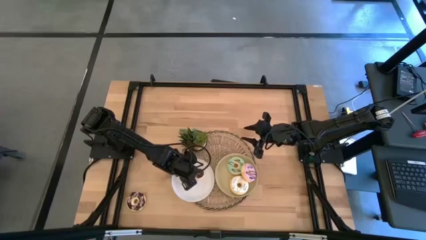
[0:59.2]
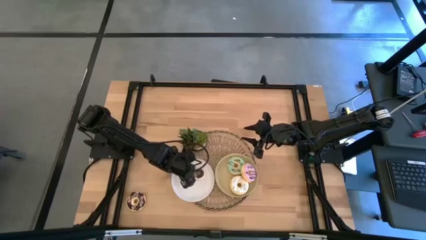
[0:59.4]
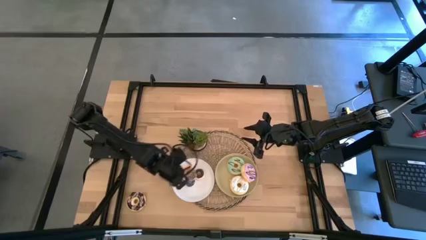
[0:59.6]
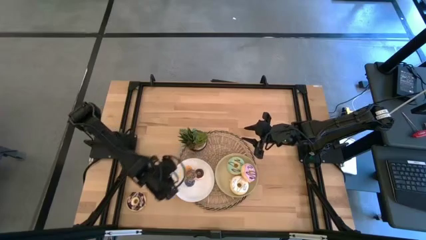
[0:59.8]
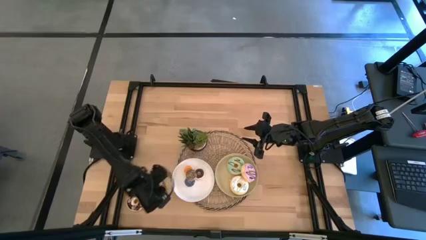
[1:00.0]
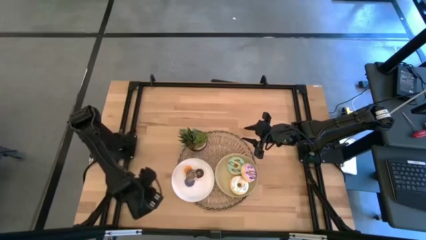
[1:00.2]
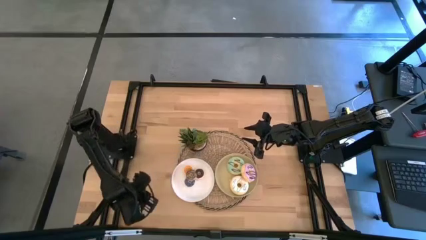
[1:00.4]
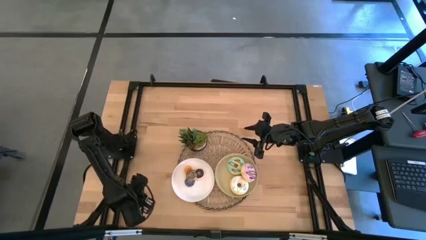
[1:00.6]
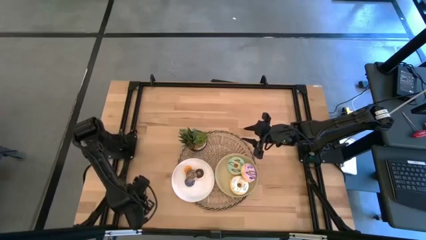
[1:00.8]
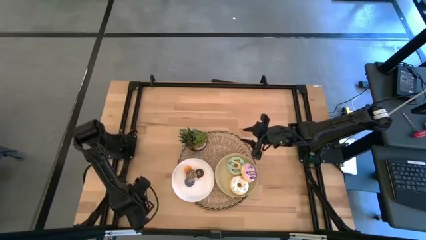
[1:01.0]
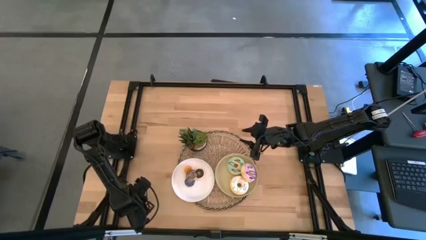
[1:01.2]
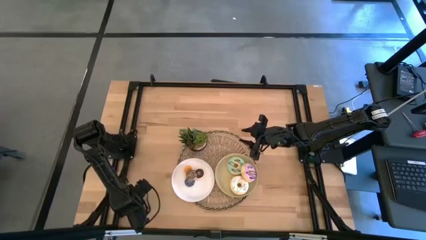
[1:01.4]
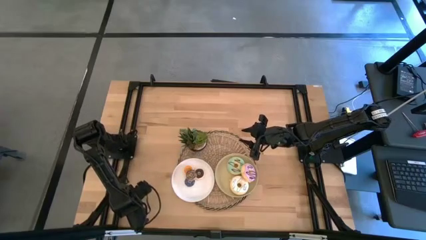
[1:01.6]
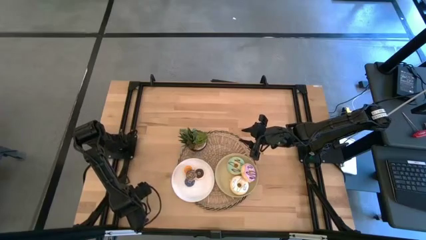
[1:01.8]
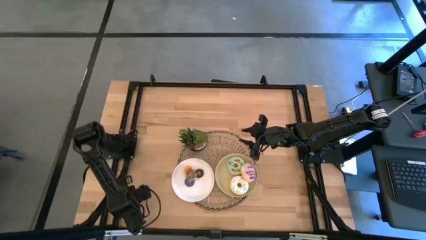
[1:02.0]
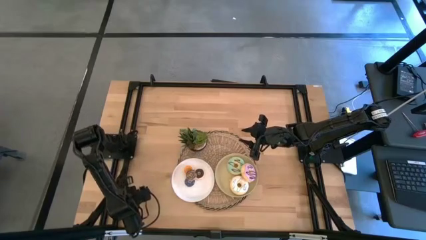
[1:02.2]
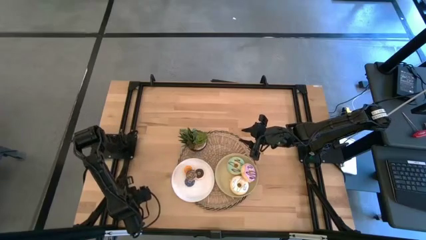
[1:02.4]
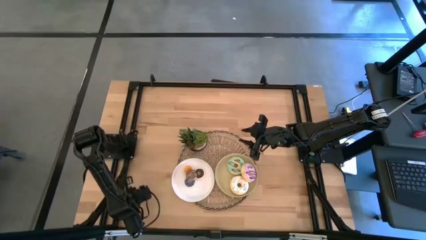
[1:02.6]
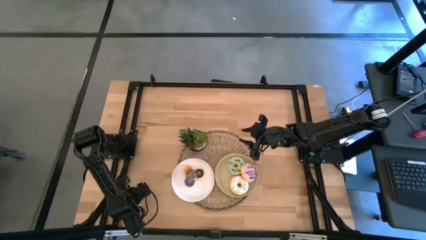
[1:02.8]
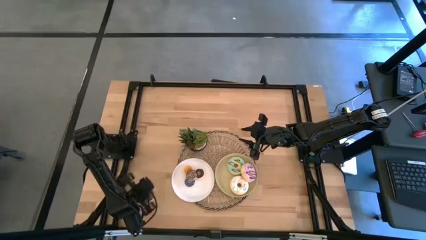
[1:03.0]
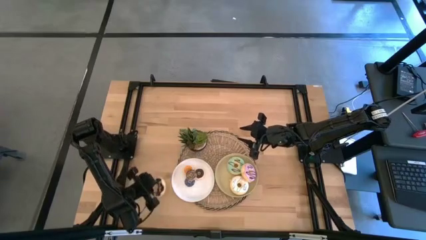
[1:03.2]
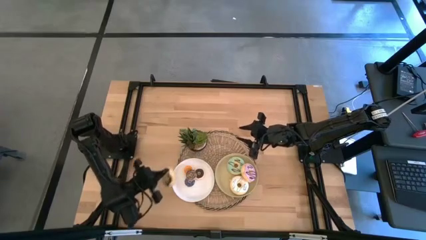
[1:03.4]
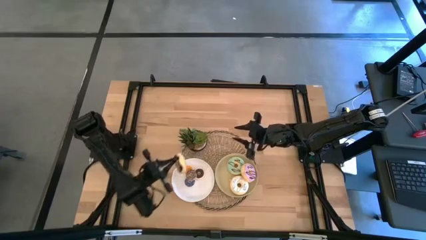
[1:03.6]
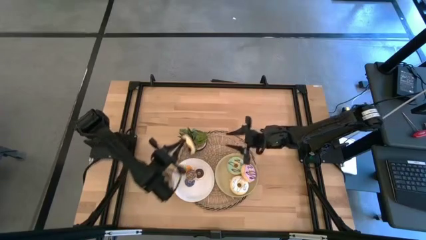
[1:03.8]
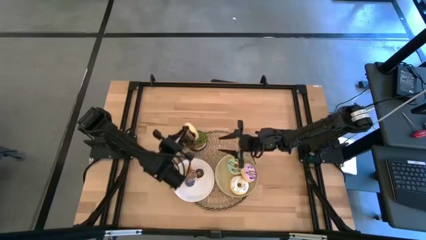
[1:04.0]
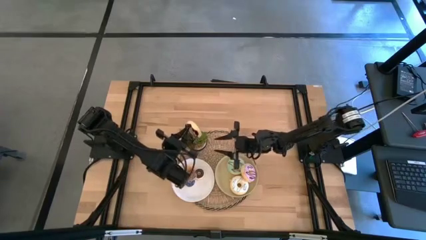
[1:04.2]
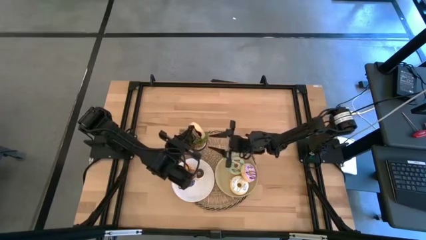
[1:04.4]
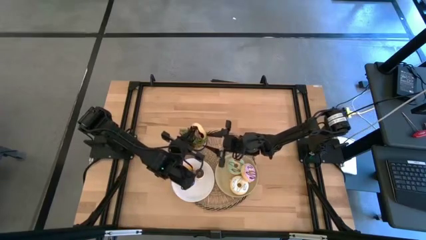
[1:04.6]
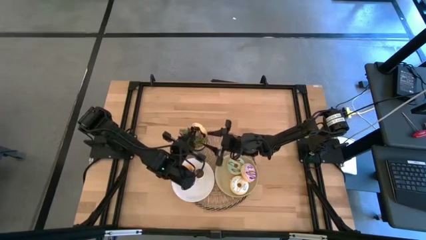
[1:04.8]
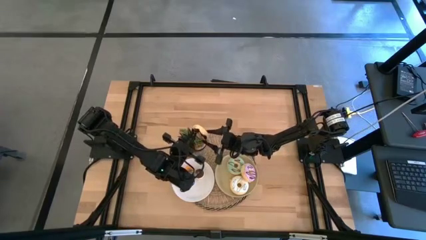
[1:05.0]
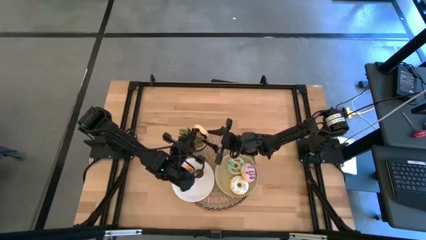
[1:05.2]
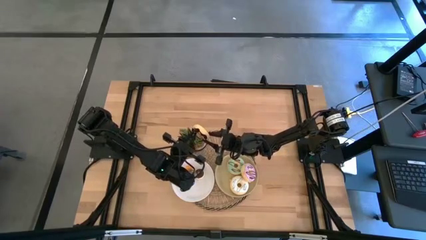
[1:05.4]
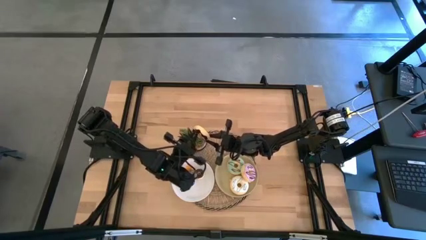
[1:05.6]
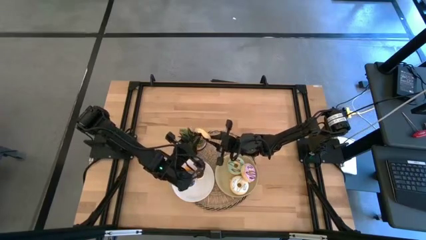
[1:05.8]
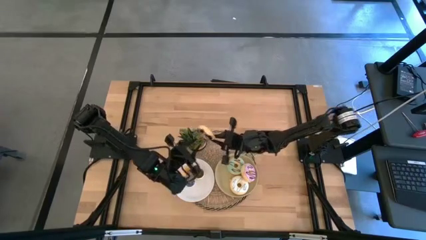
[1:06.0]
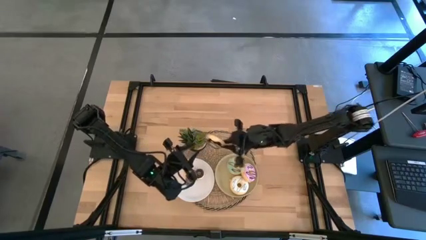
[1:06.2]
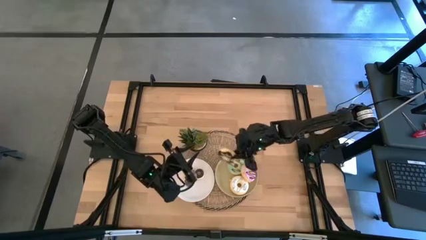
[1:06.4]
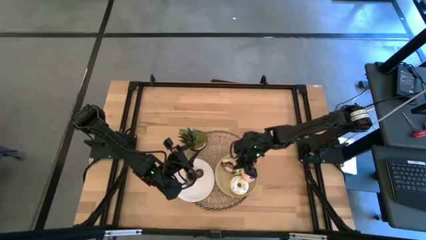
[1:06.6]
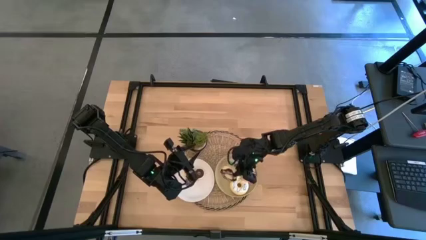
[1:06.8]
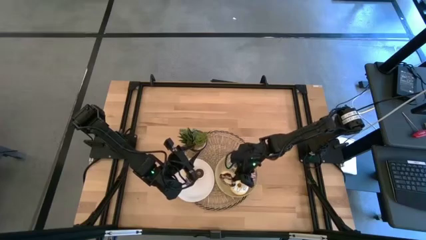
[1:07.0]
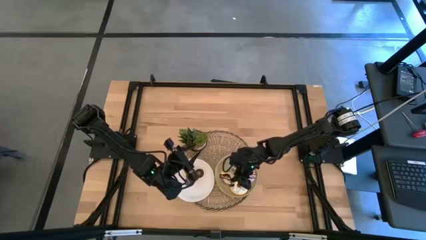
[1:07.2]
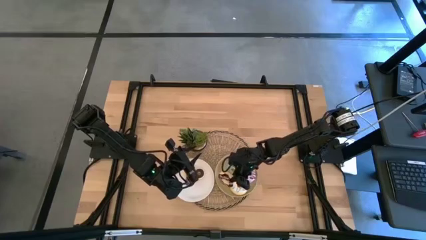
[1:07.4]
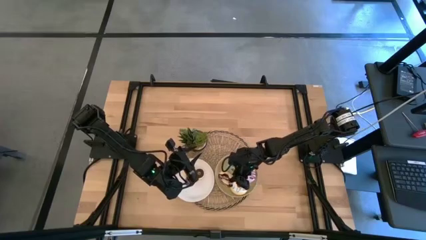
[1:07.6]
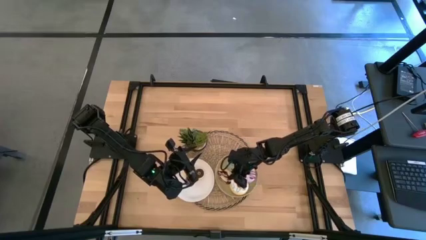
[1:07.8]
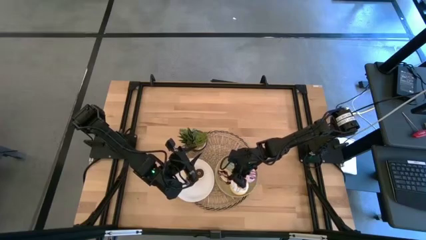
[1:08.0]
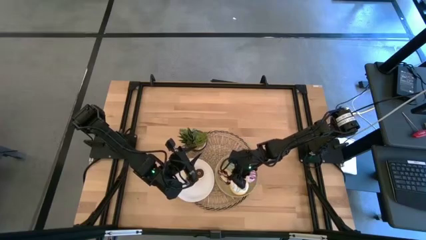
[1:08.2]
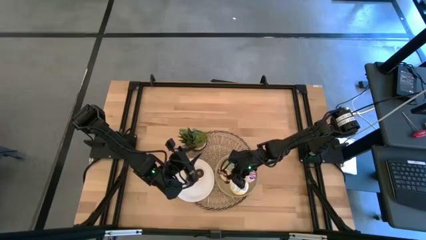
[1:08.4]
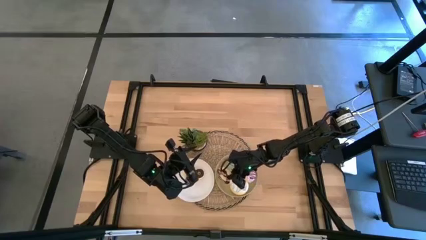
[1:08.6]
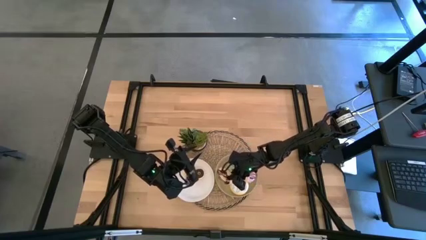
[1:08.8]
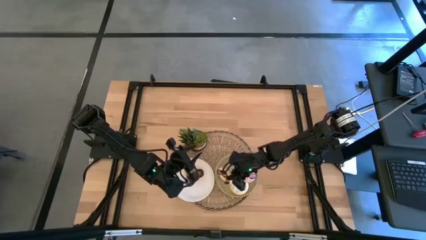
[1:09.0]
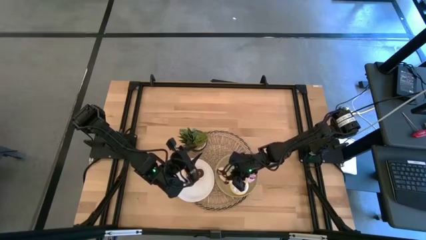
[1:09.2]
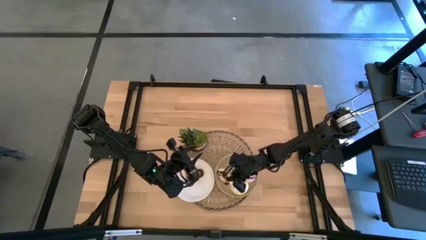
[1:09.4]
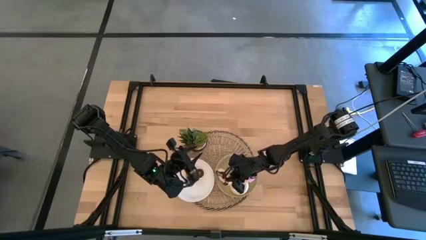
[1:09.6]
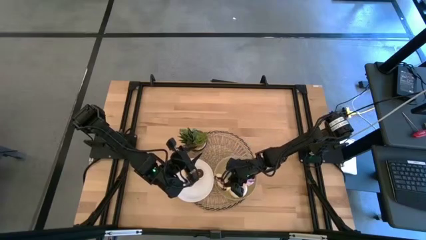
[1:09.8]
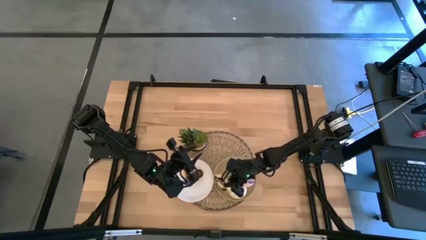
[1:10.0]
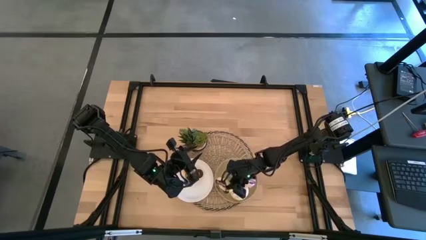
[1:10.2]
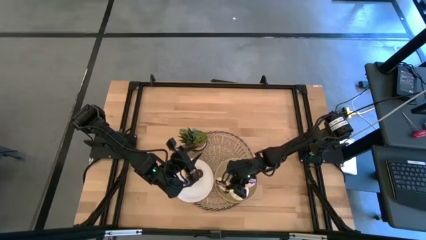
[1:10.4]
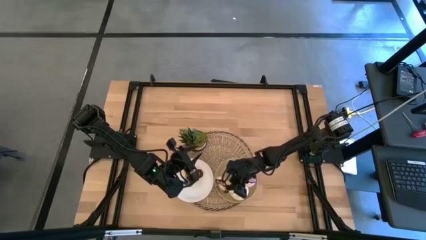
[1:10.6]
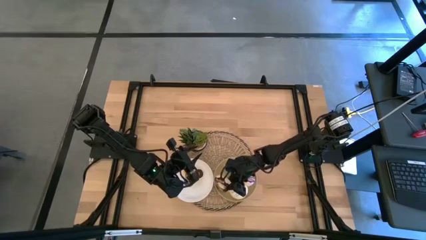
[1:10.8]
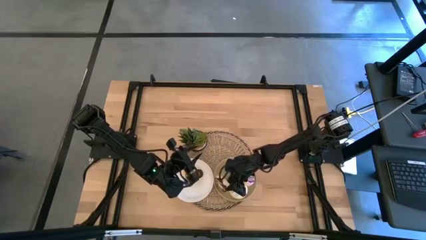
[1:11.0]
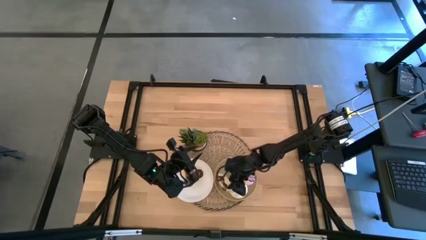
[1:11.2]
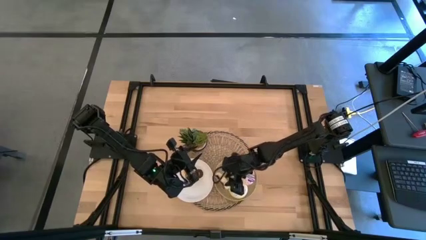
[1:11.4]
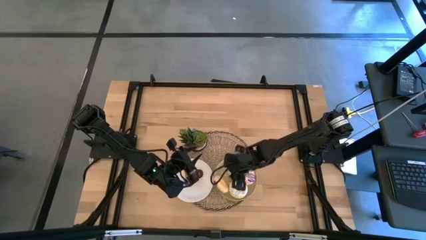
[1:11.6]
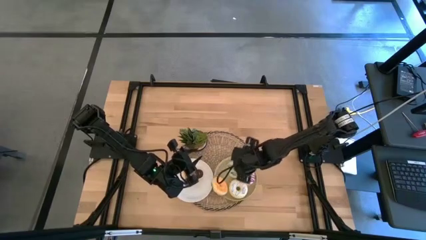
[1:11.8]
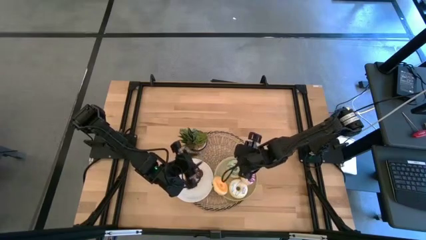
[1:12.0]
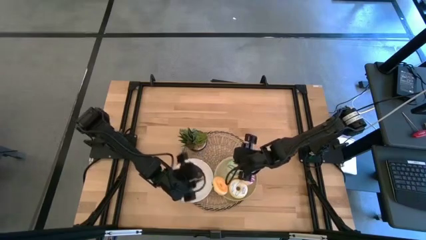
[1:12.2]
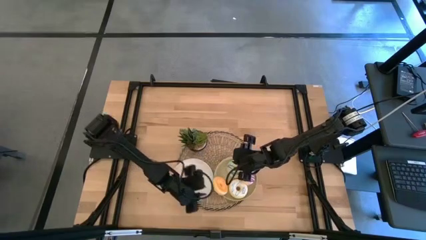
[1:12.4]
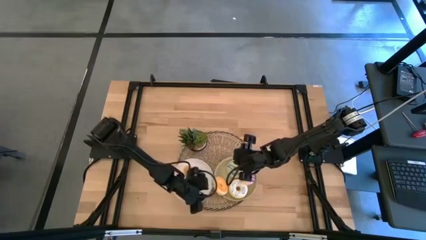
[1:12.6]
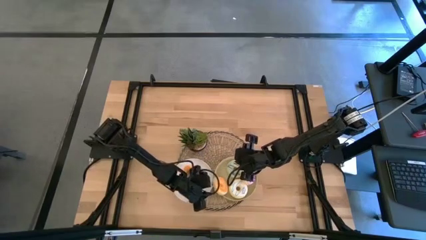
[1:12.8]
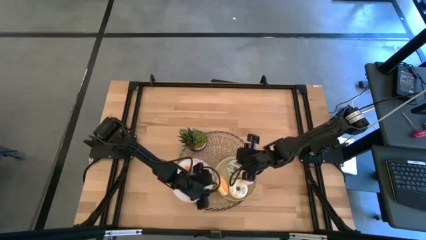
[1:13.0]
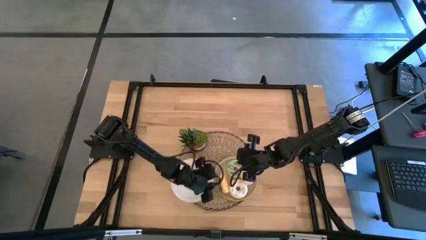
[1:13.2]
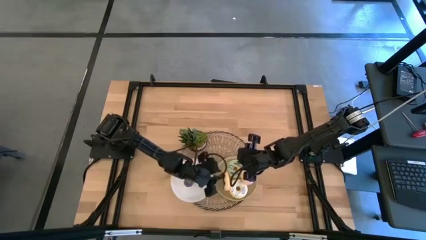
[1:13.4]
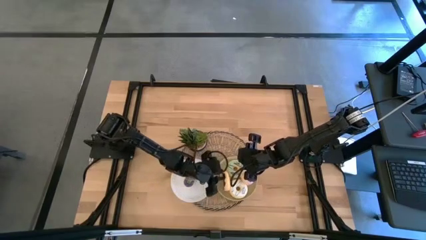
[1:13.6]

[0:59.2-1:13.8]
Task: Pick & Place donuts
Put the big black donut on the brown plate

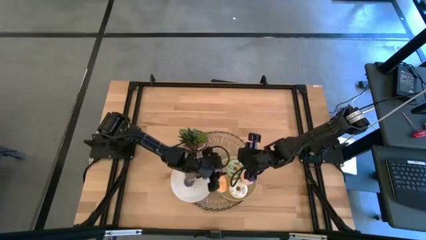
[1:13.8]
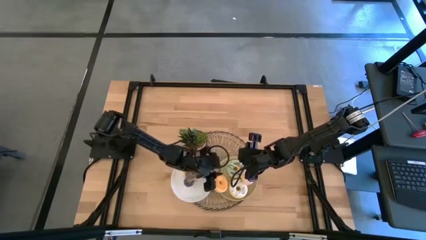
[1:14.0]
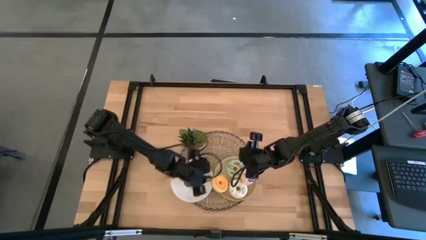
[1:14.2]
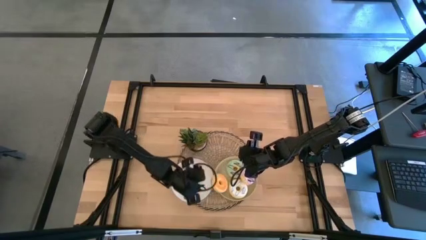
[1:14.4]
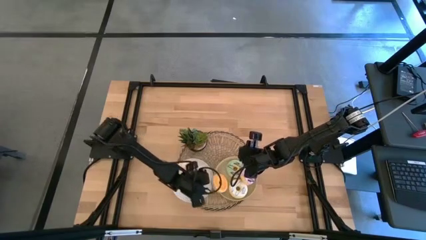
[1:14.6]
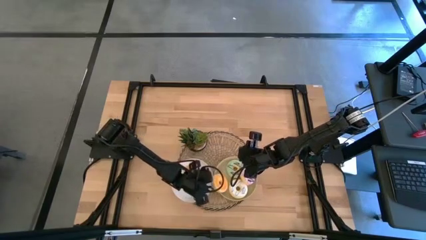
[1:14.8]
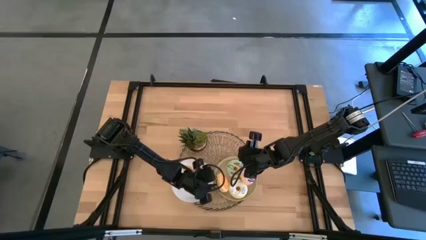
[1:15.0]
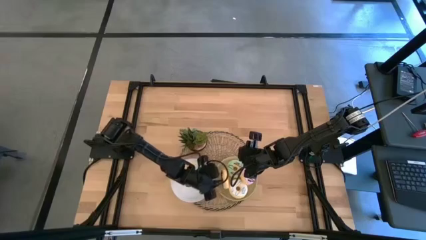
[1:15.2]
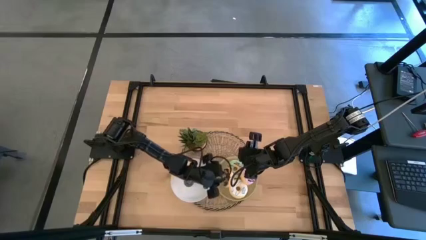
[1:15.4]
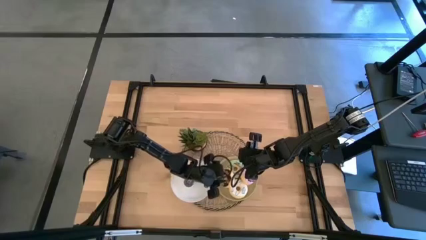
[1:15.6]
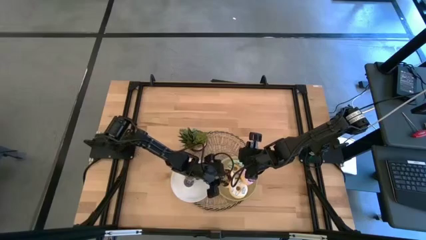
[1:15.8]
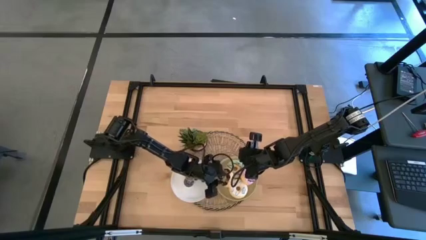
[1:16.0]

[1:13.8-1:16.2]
Put the big black donut on the brown plate
